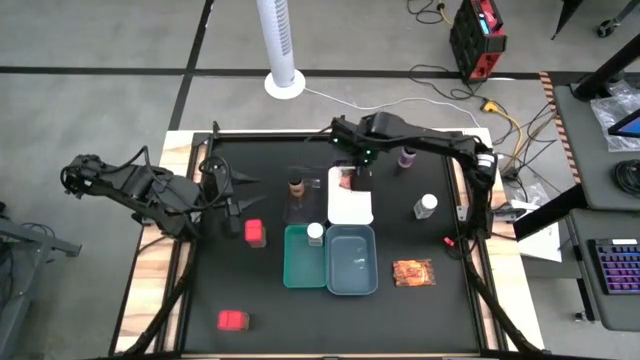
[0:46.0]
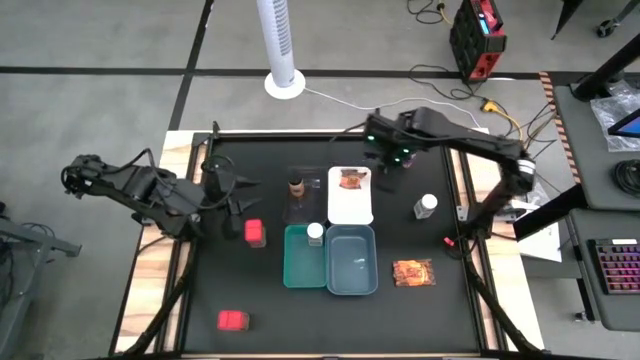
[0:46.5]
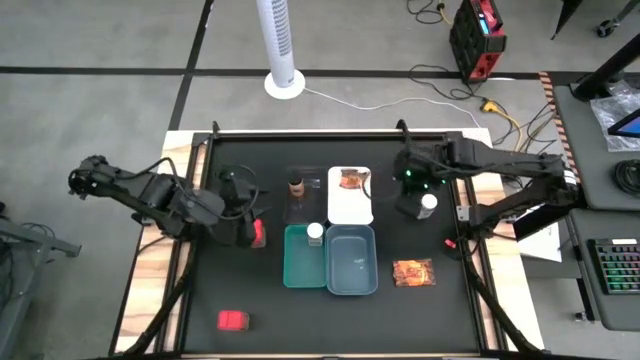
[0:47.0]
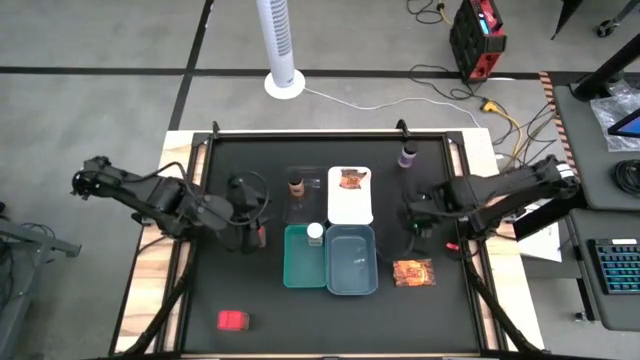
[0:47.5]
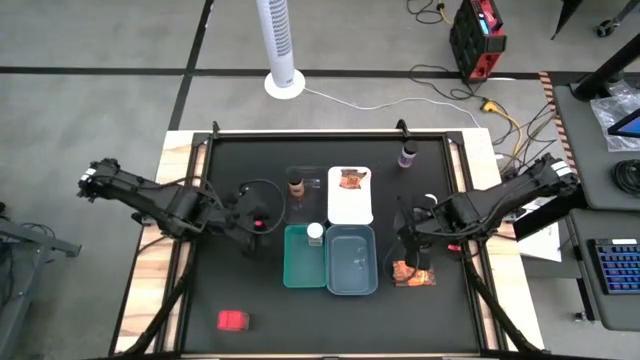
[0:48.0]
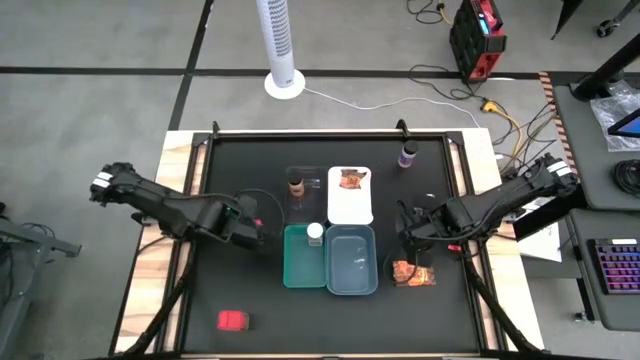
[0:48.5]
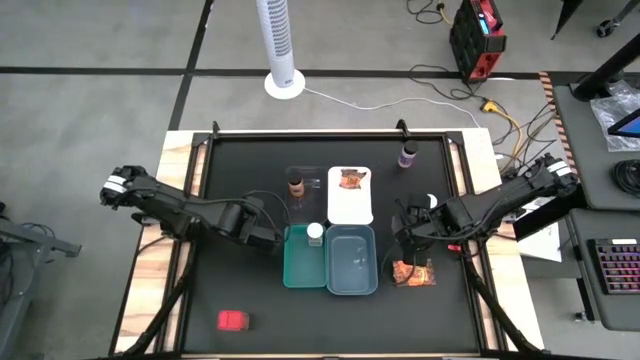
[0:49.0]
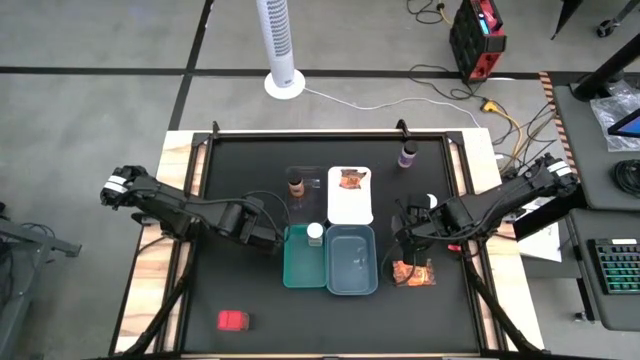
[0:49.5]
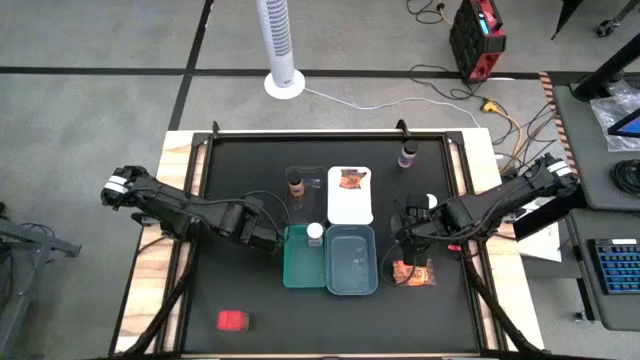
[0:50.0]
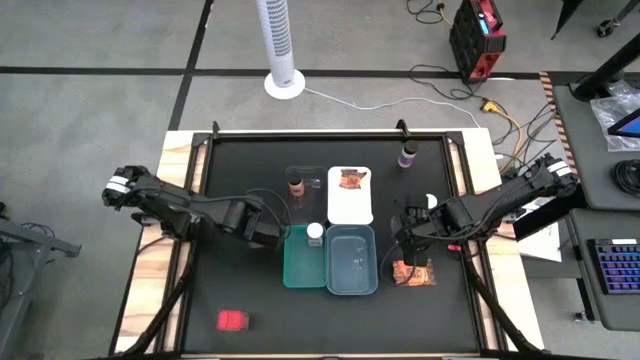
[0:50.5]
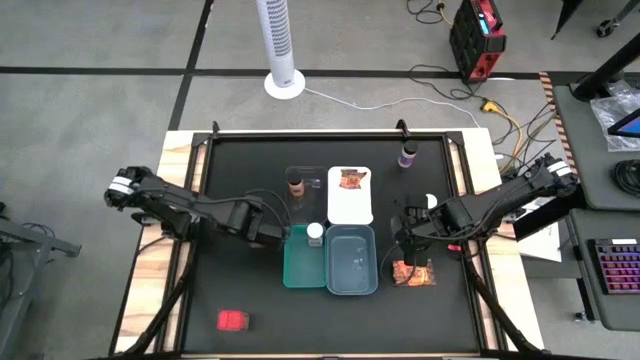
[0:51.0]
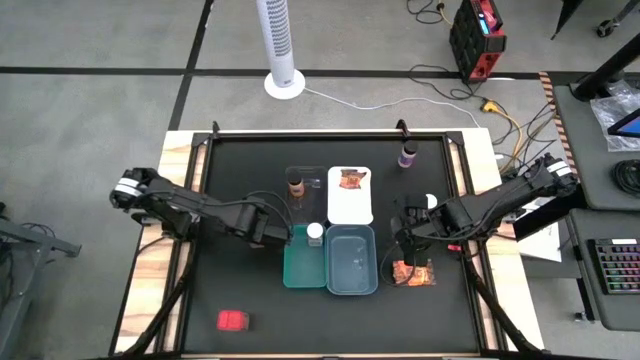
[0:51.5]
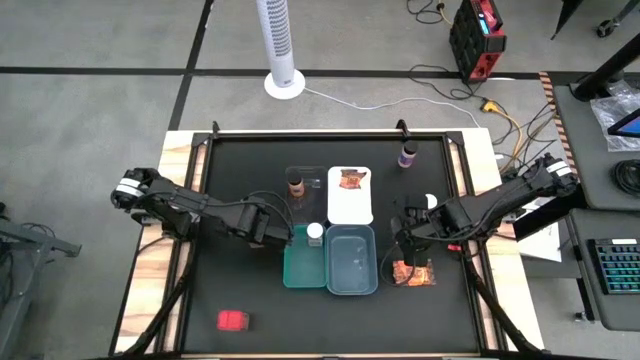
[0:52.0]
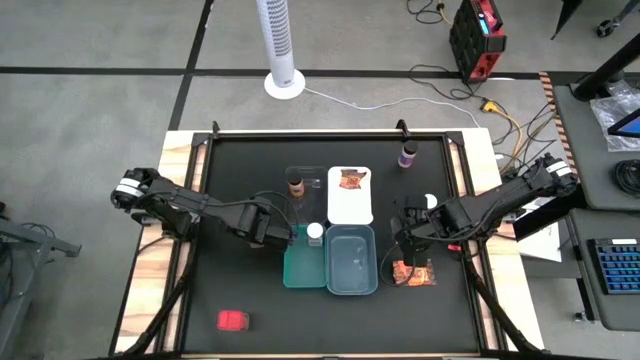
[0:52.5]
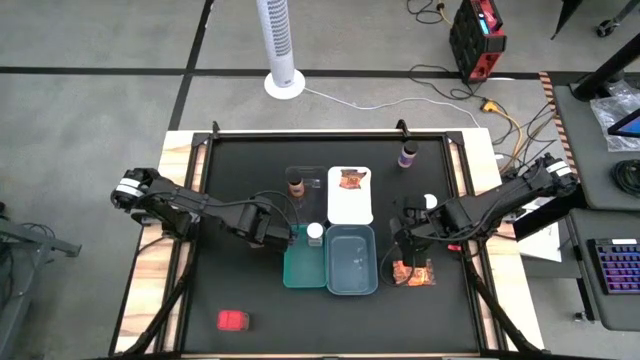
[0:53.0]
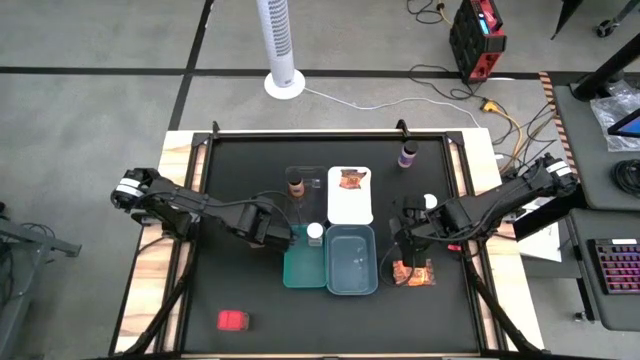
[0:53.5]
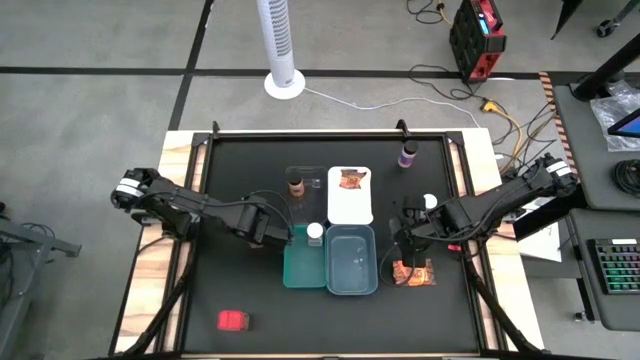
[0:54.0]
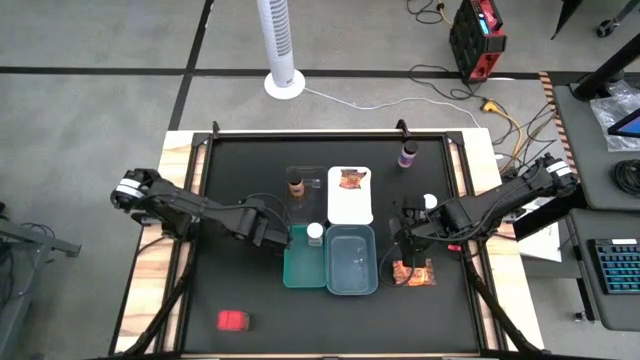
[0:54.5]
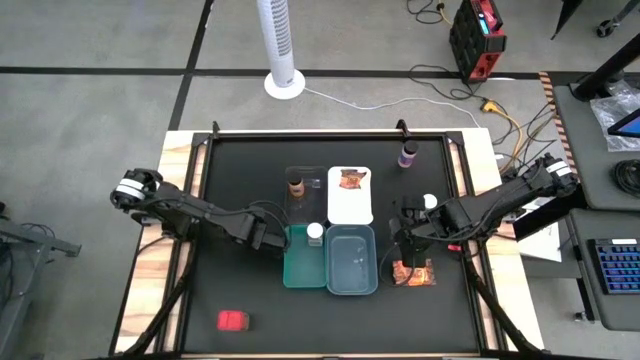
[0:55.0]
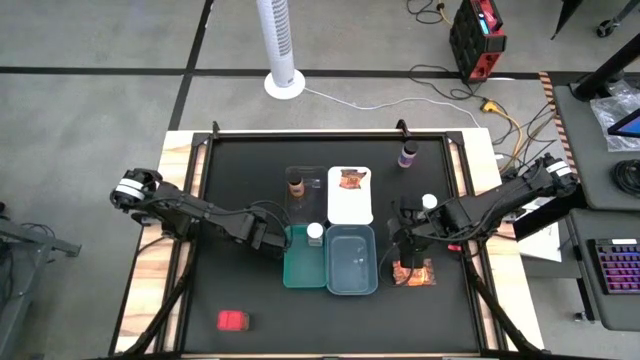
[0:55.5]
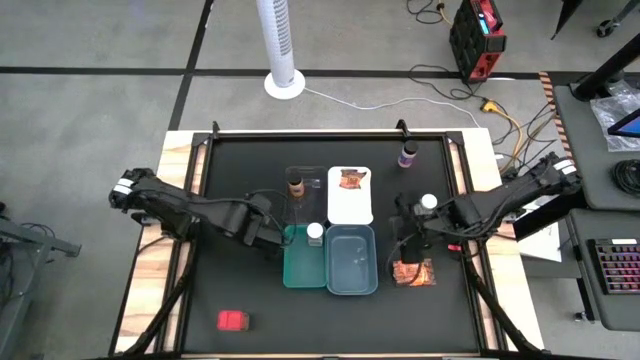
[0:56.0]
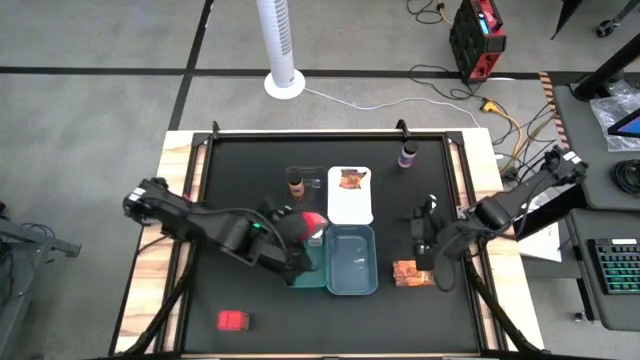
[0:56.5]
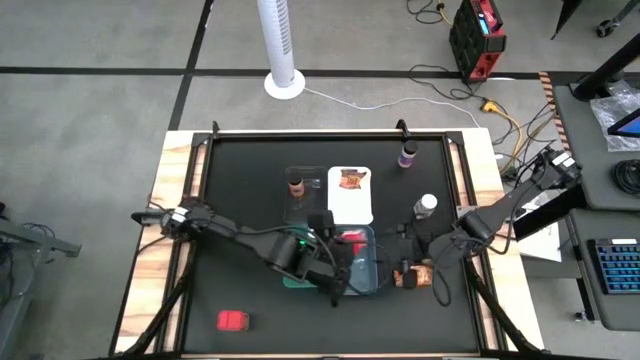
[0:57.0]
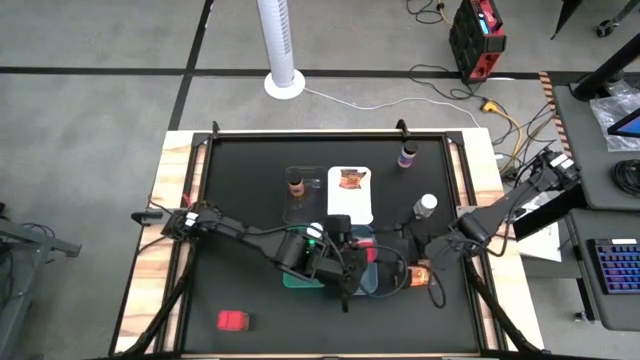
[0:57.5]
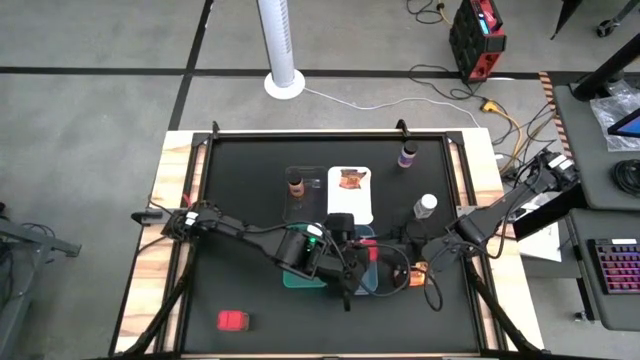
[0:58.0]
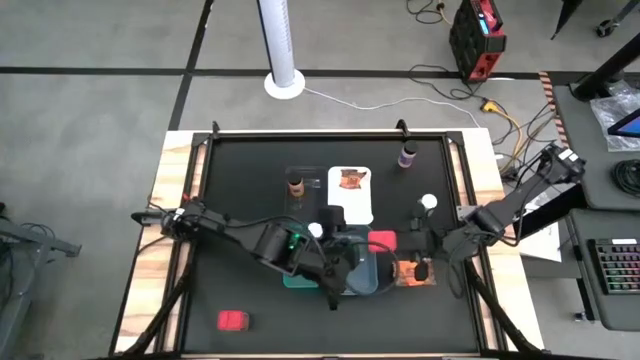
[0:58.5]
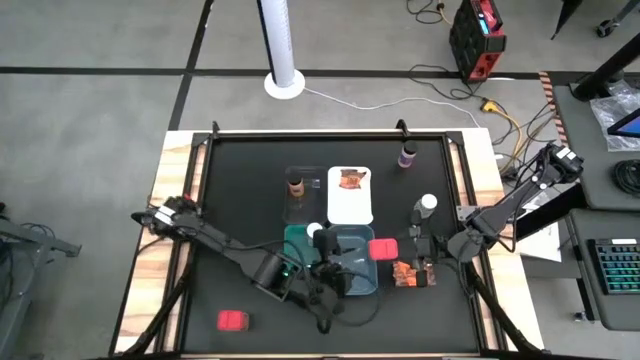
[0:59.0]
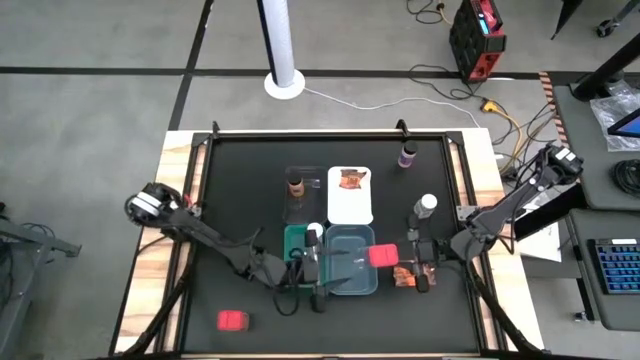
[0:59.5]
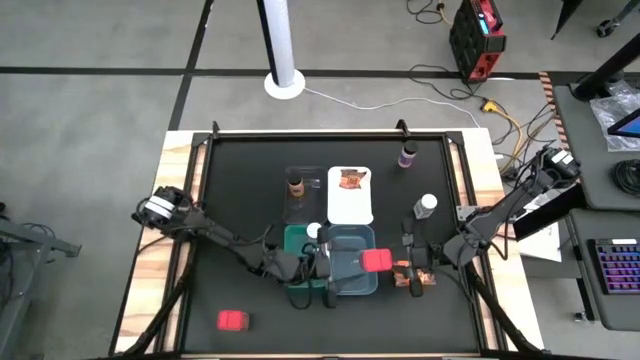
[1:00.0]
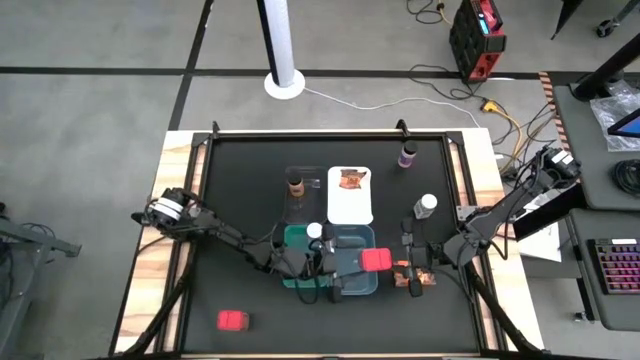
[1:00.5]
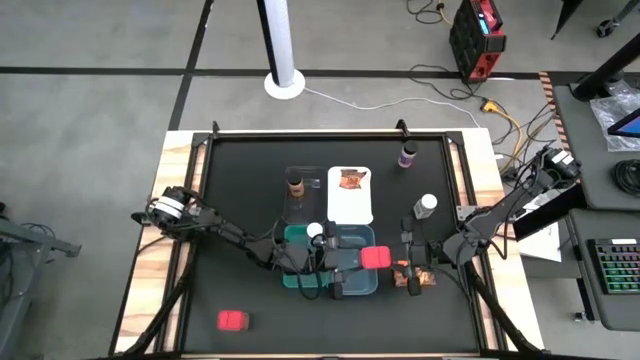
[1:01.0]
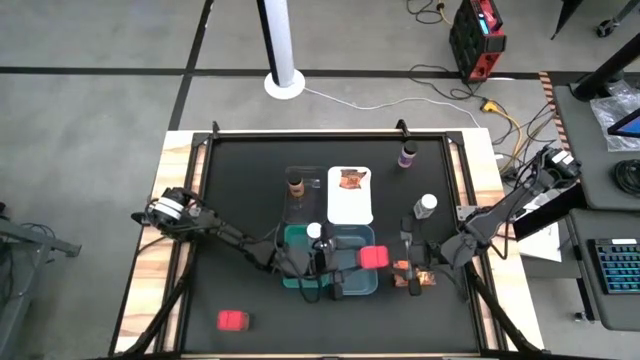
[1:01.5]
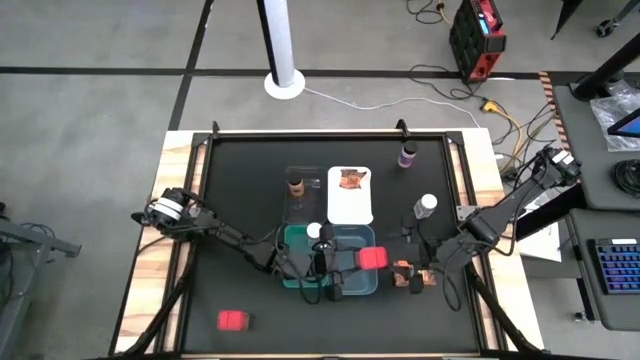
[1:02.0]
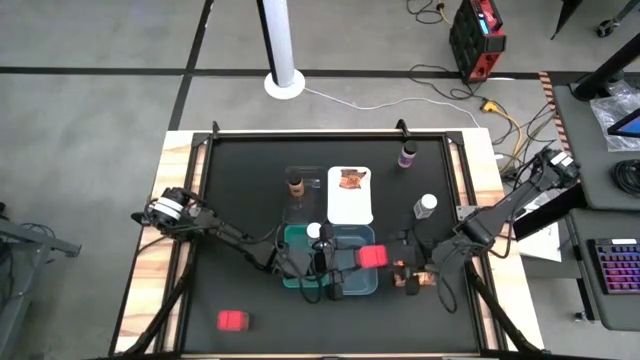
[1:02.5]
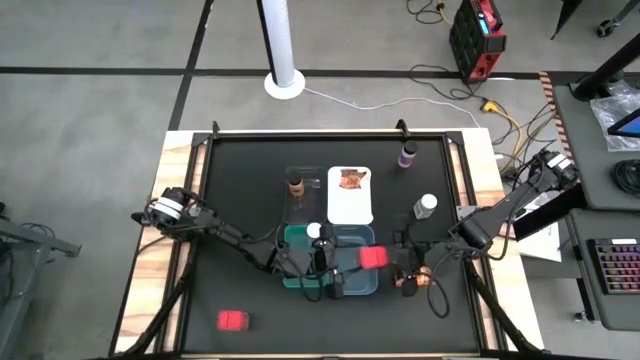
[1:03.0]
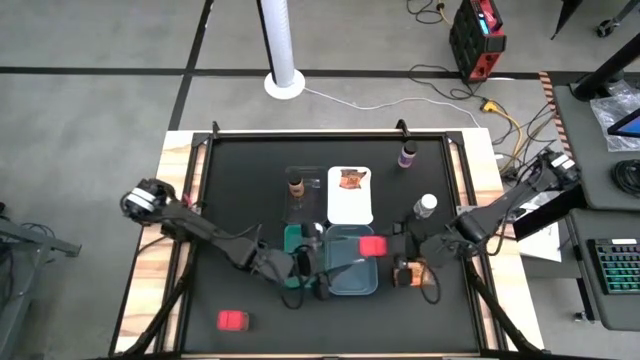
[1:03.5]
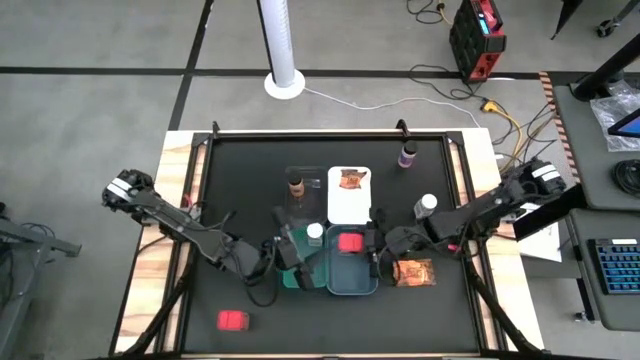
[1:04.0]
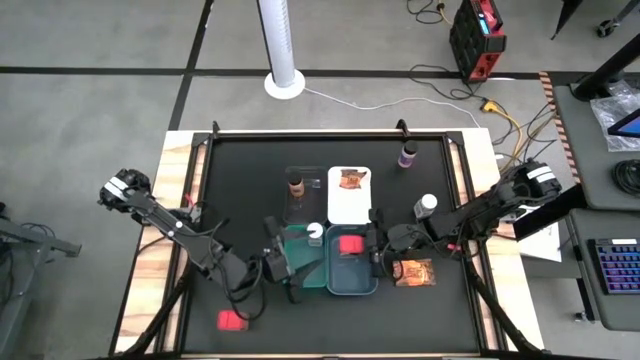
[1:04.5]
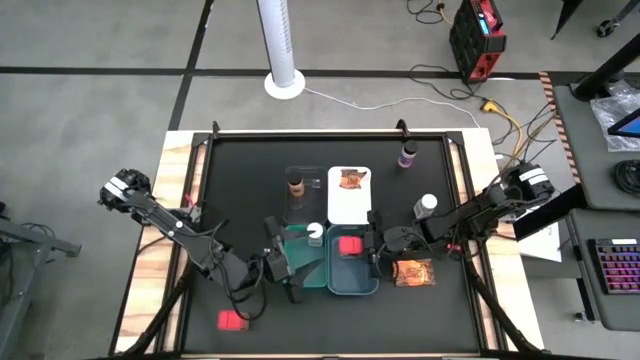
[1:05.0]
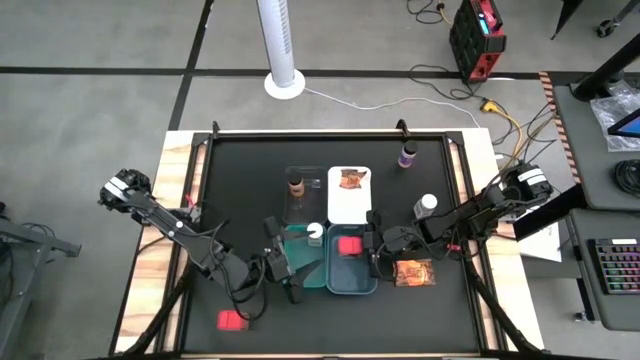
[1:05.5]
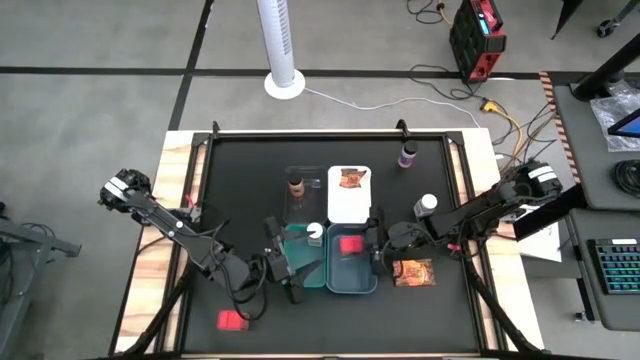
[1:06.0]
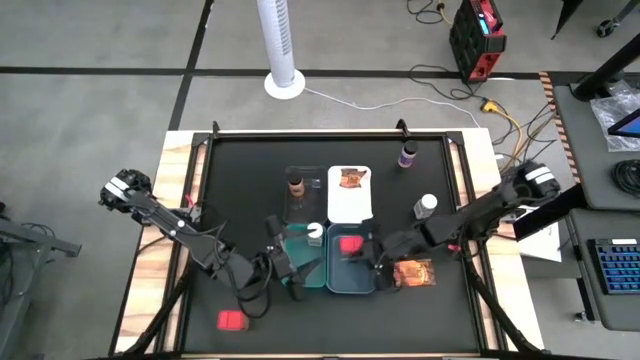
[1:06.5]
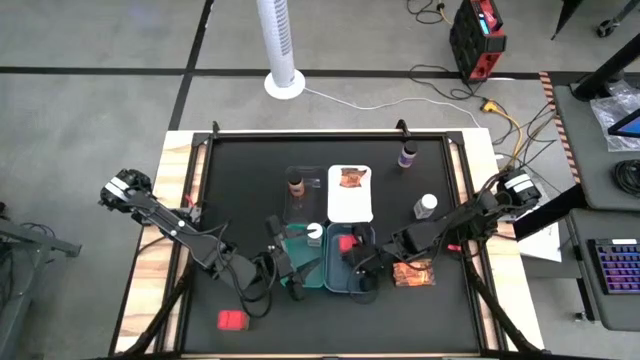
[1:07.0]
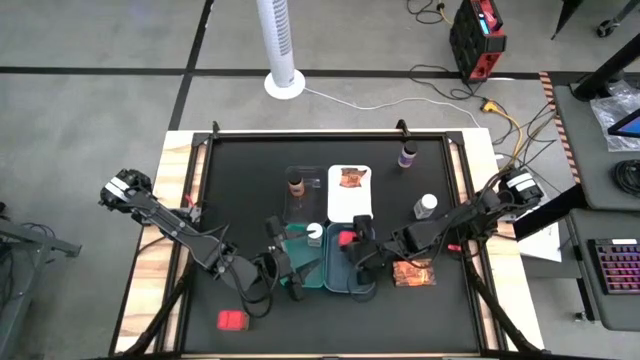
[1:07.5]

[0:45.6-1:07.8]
Task: Sort spices by type
Put the top red seasoning can into the blue bin
